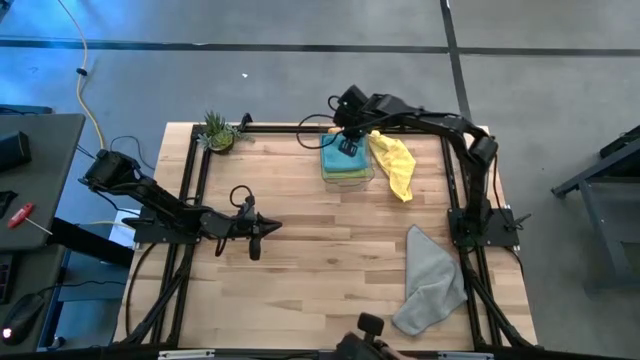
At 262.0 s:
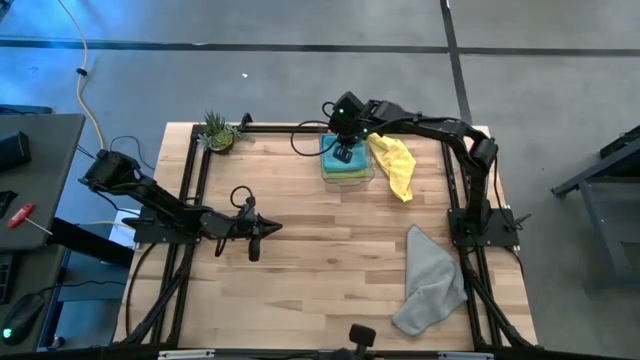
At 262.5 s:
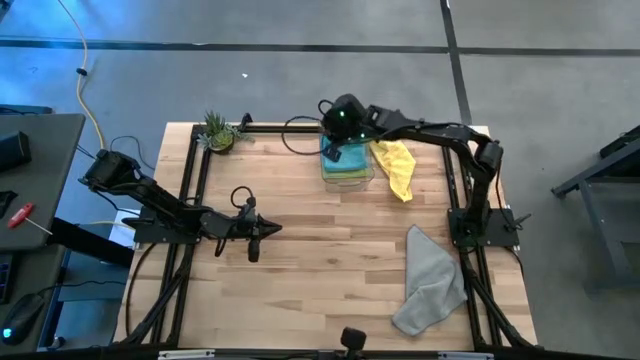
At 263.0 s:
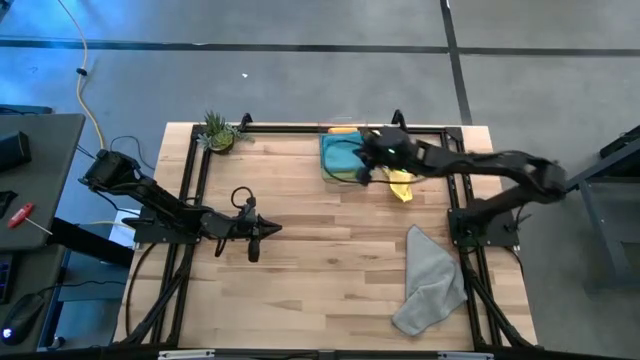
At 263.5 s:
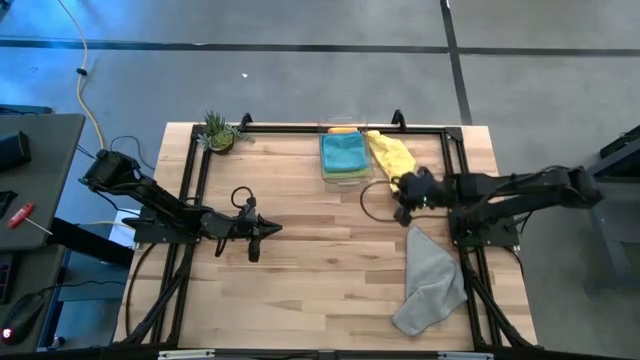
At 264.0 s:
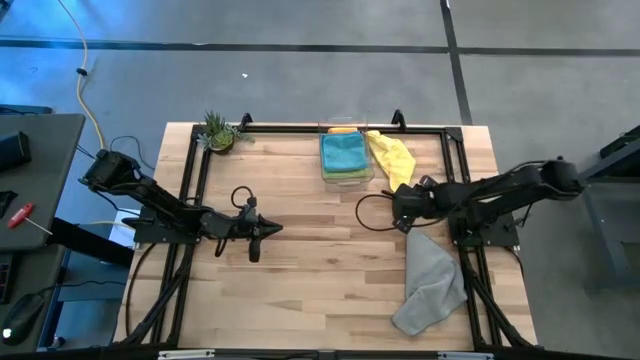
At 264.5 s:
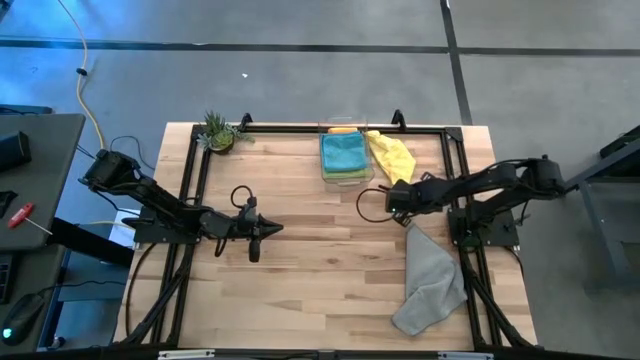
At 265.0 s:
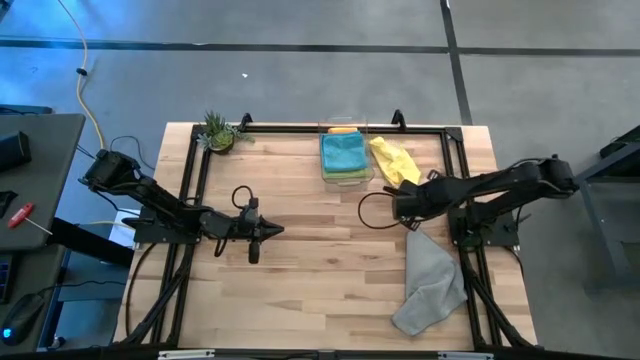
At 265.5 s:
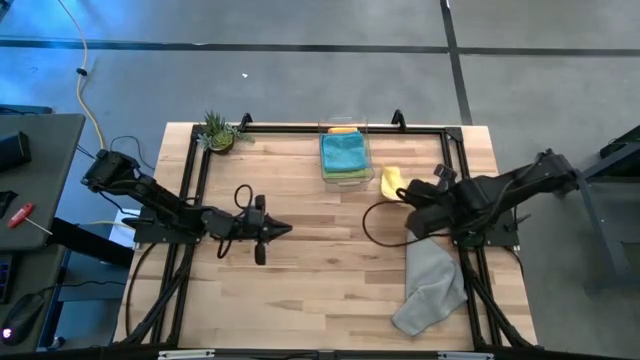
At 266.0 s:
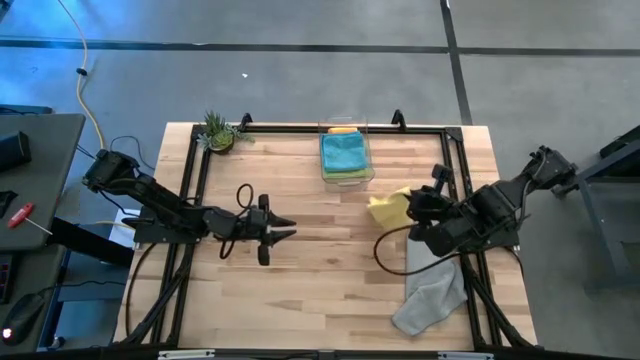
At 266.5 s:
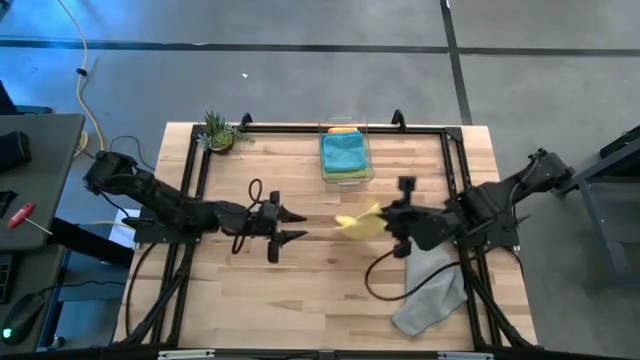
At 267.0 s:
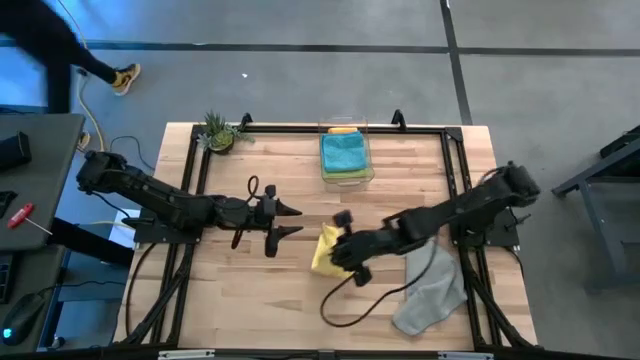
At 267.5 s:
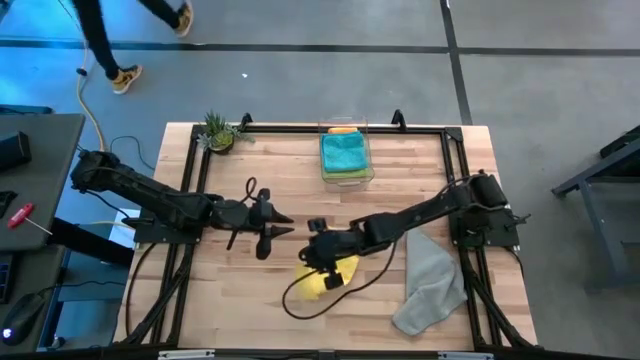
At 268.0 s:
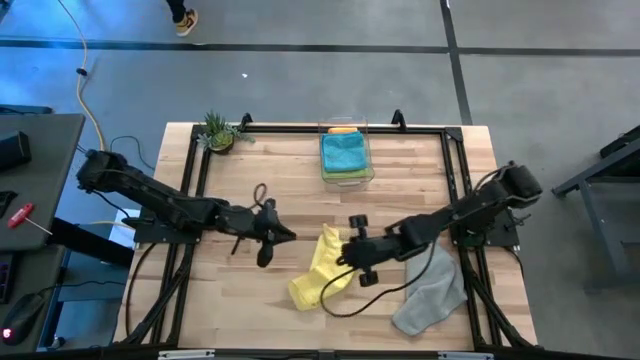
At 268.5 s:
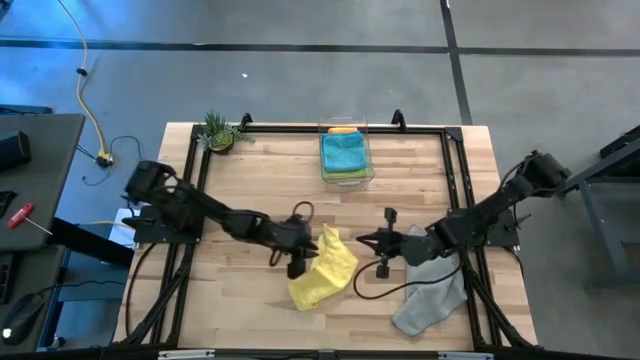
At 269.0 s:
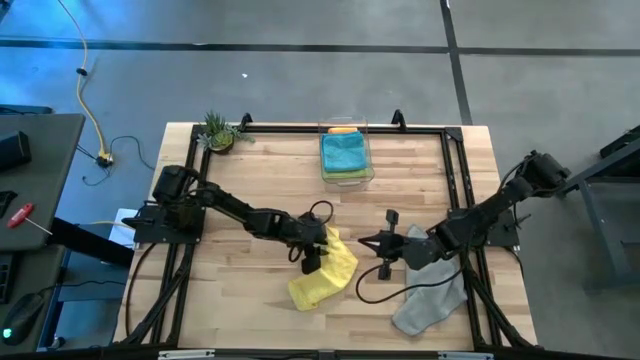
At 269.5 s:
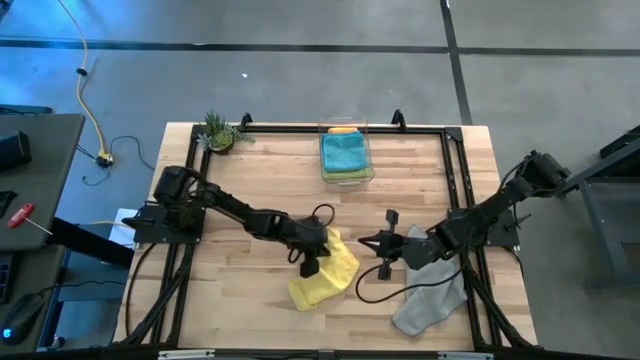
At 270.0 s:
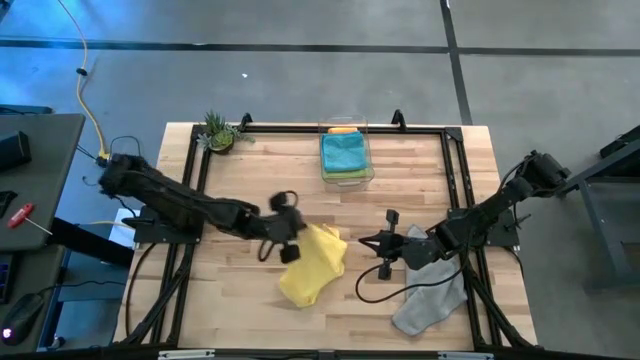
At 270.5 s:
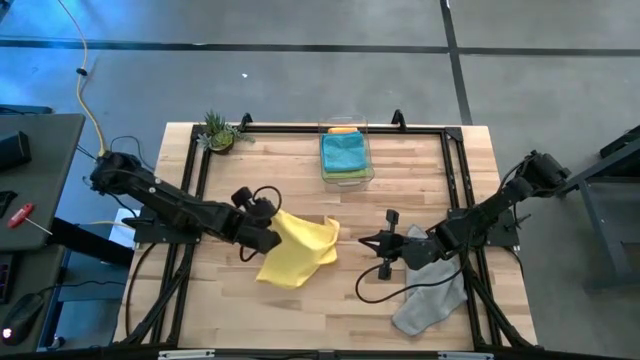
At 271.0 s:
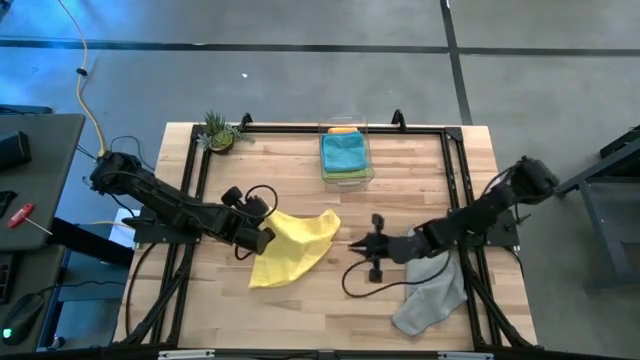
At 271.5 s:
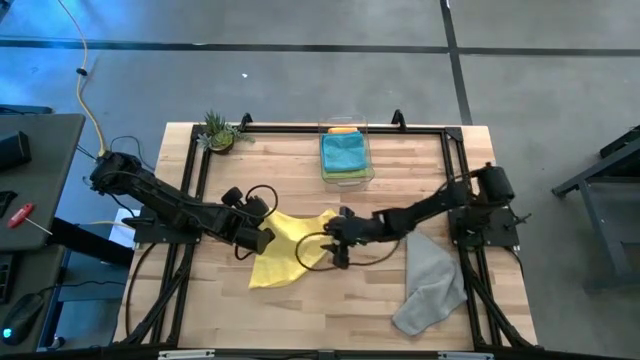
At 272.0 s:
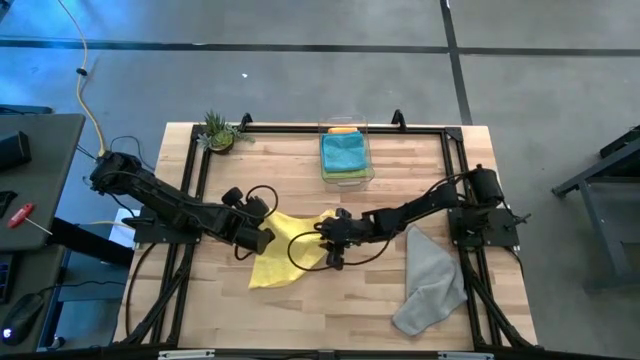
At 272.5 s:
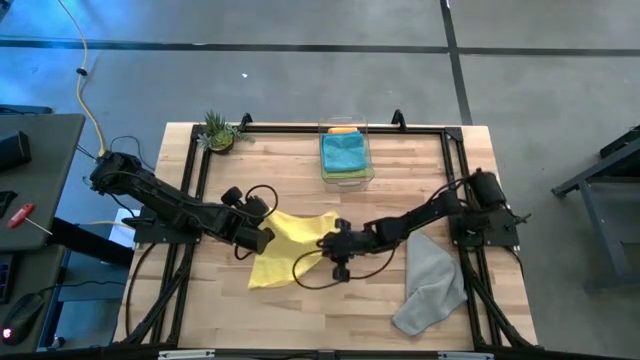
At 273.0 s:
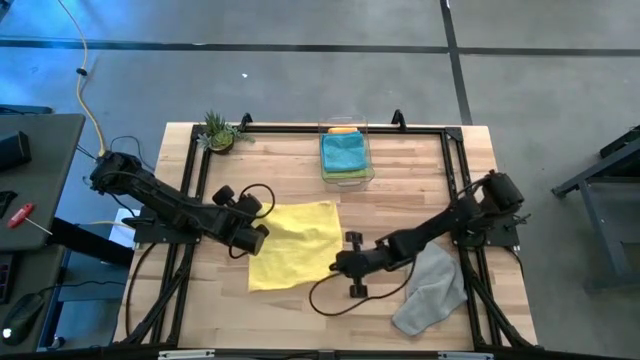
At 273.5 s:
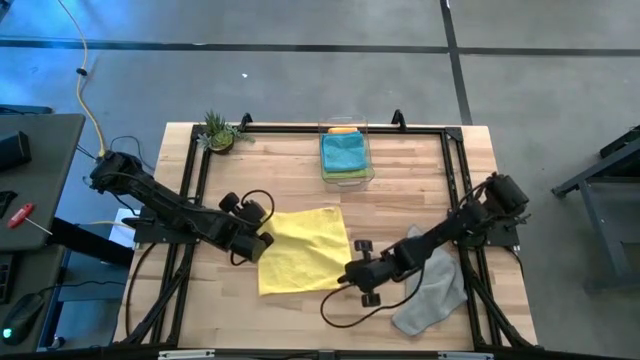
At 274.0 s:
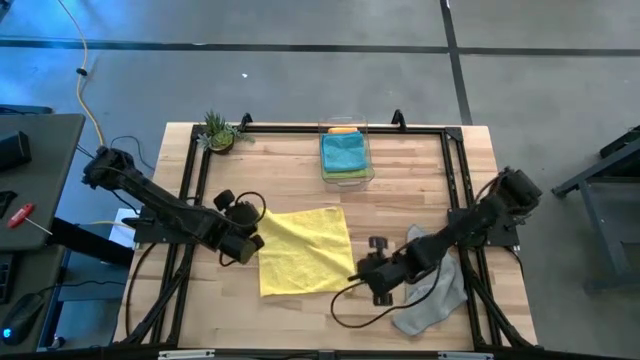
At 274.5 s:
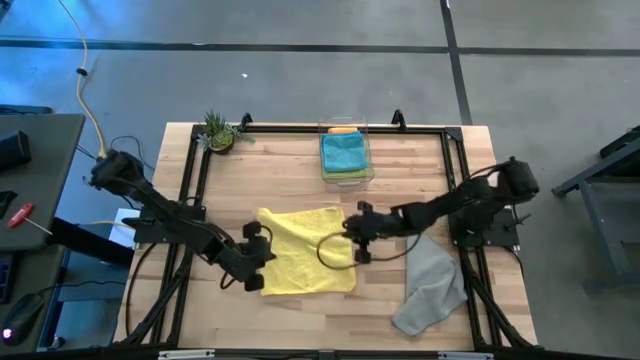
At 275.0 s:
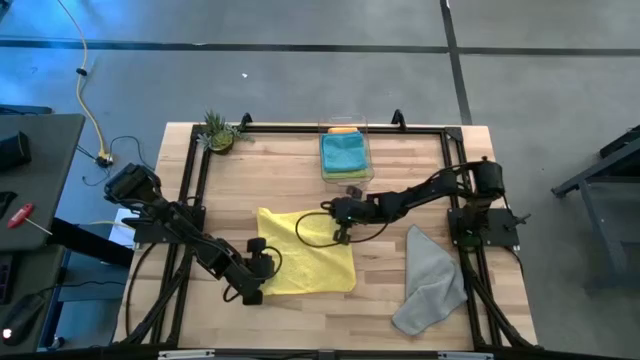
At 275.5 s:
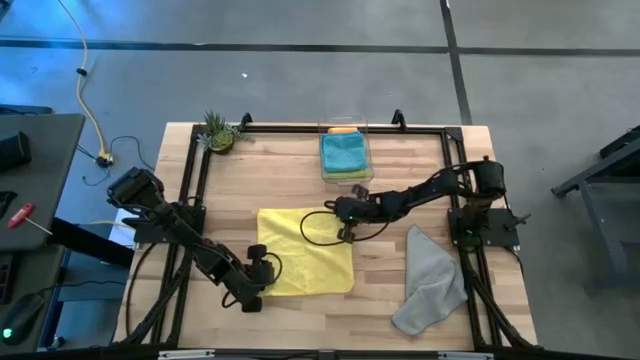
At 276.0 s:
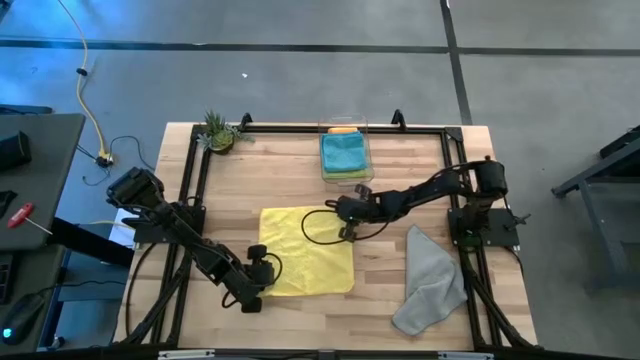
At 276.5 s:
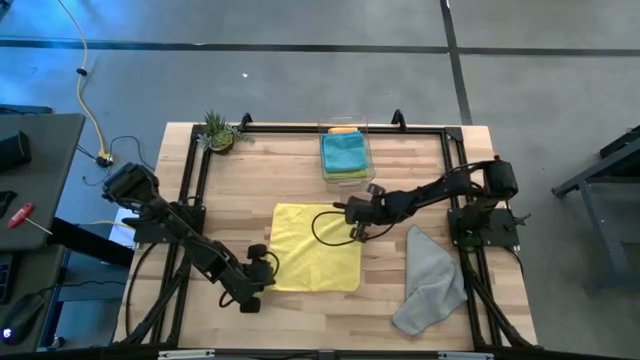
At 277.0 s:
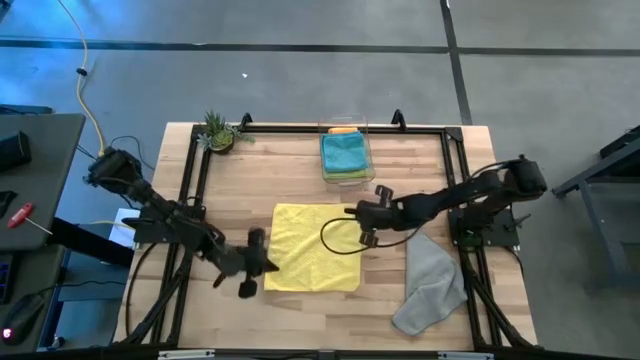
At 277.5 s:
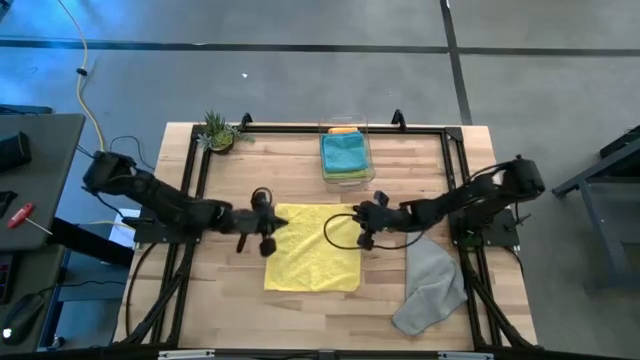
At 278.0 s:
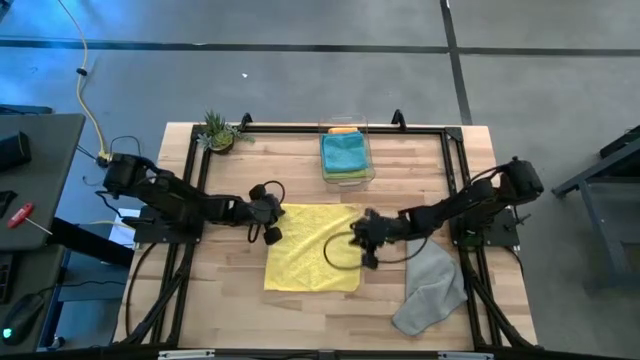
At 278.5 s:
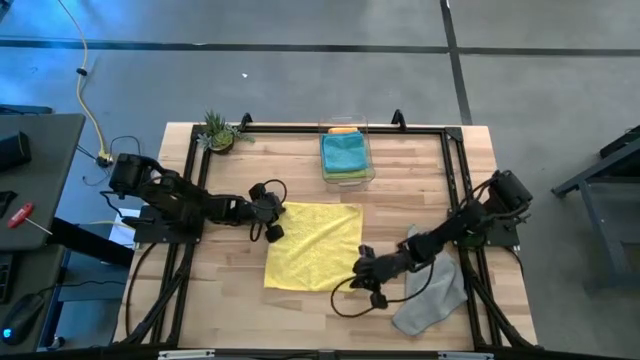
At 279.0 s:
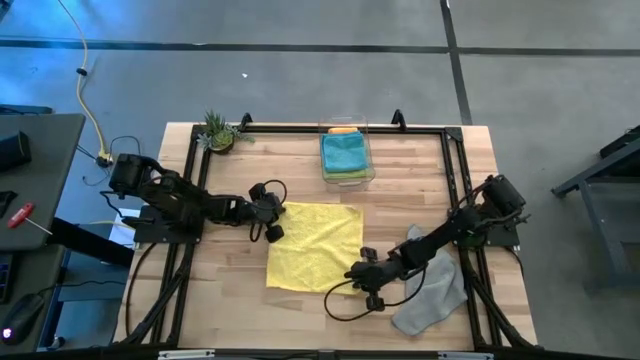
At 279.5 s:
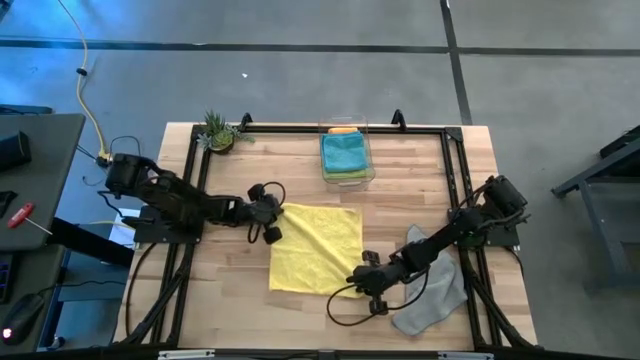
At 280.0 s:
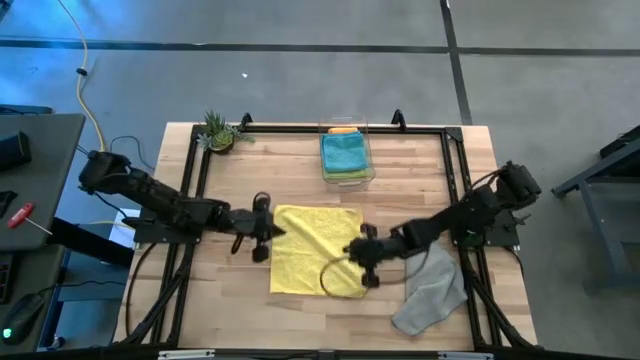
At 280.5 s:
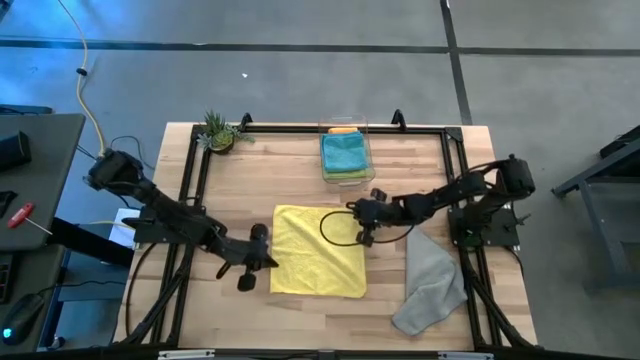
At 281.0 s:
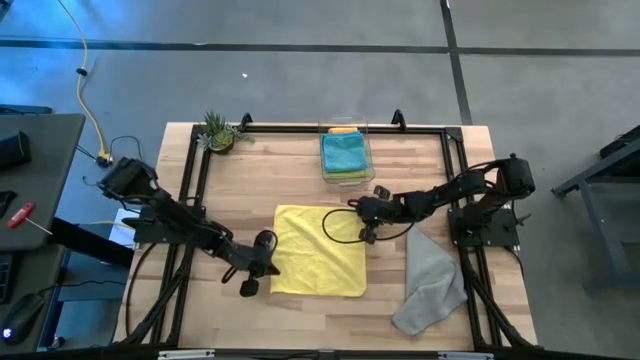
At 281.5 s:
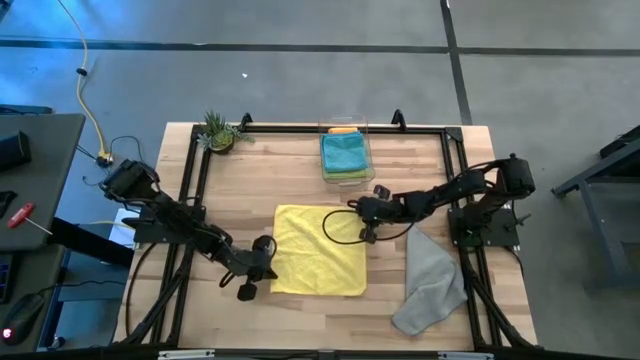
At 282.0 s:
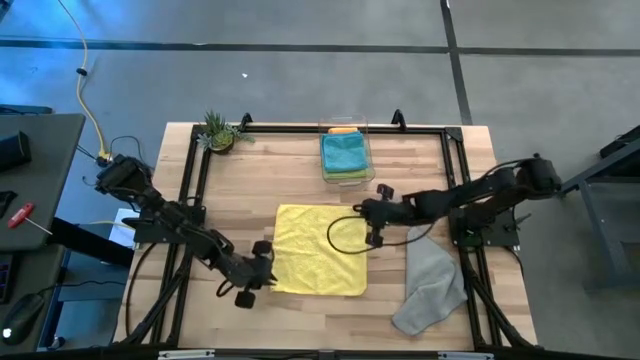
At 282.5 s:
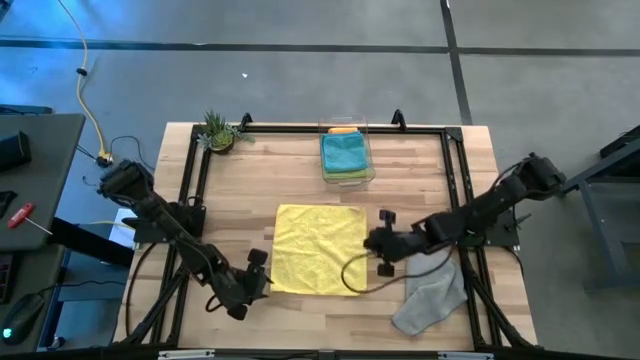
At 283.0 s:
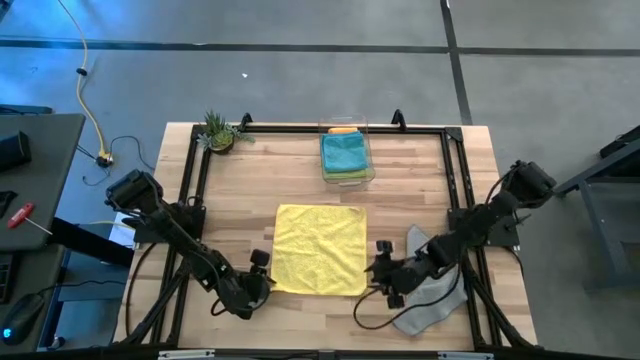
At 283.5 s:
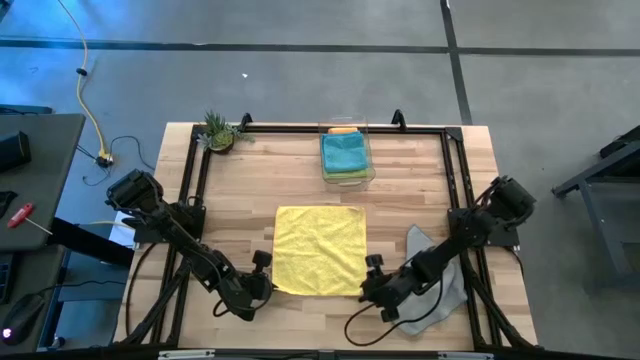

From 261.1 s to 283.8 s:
Task: Fold microfiber towels
Fold the yellow microfiber cloth
